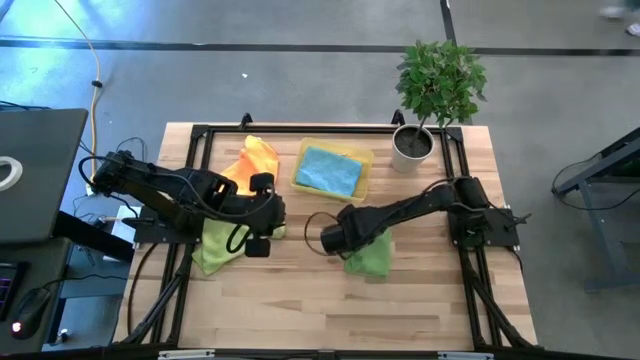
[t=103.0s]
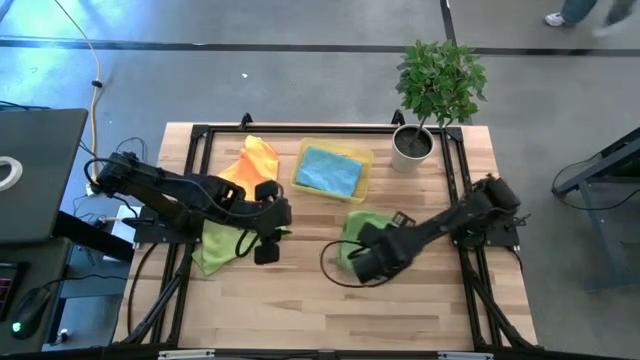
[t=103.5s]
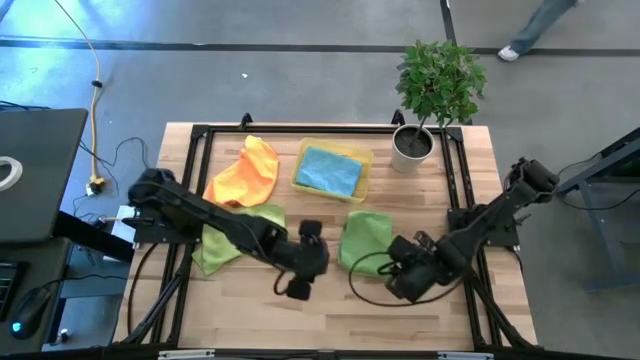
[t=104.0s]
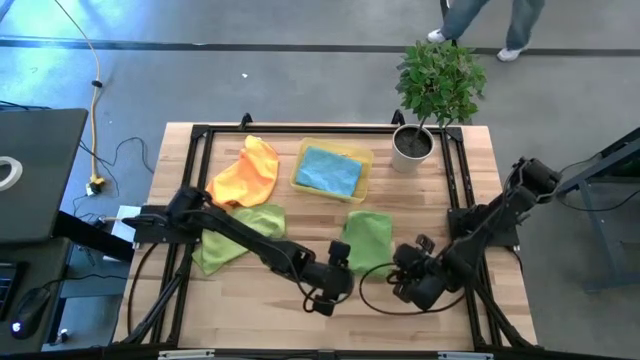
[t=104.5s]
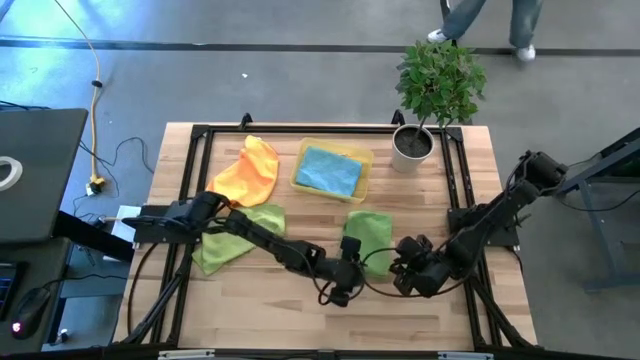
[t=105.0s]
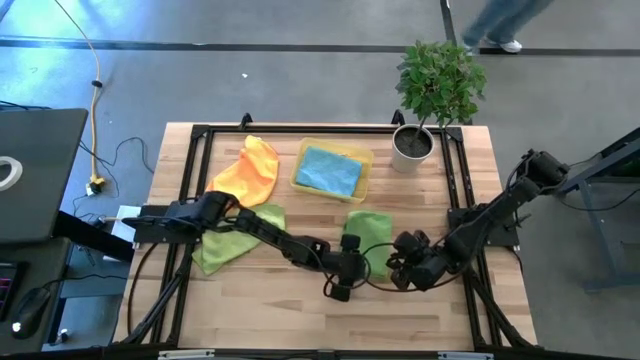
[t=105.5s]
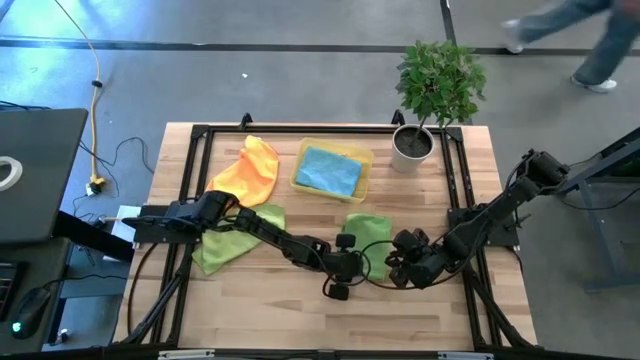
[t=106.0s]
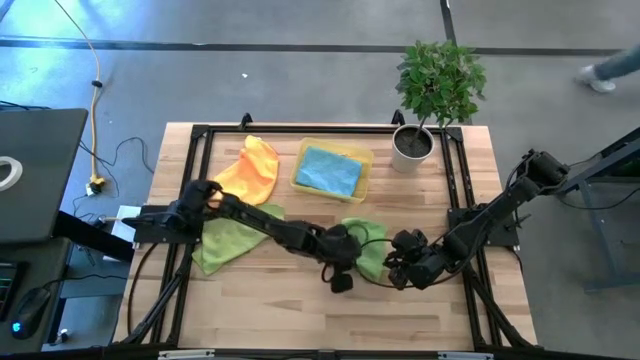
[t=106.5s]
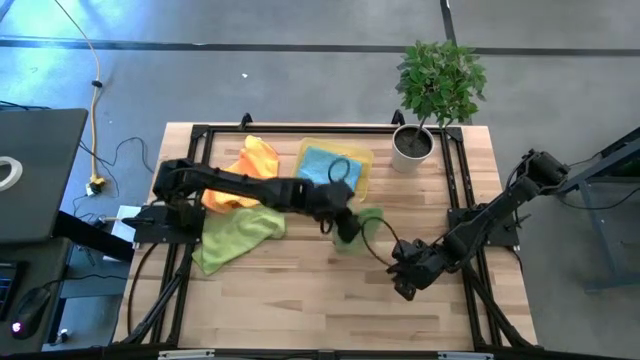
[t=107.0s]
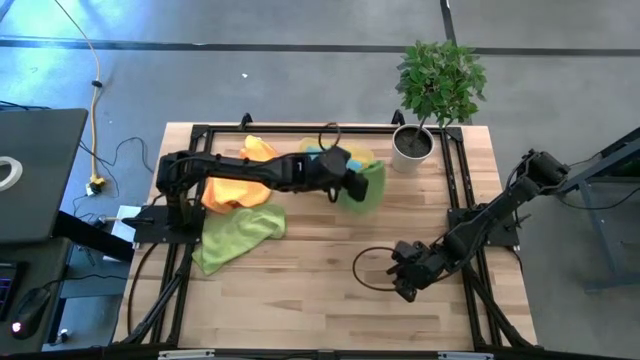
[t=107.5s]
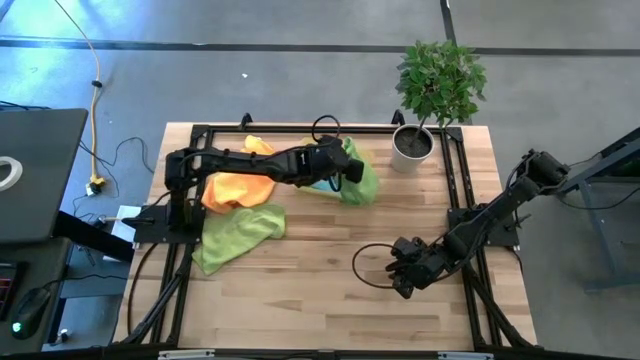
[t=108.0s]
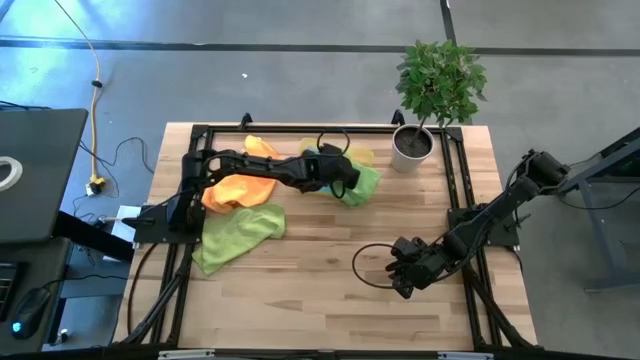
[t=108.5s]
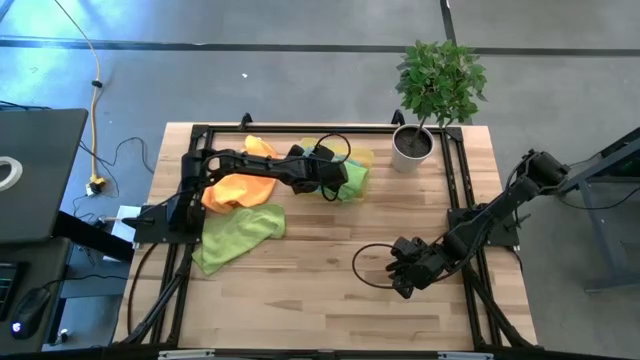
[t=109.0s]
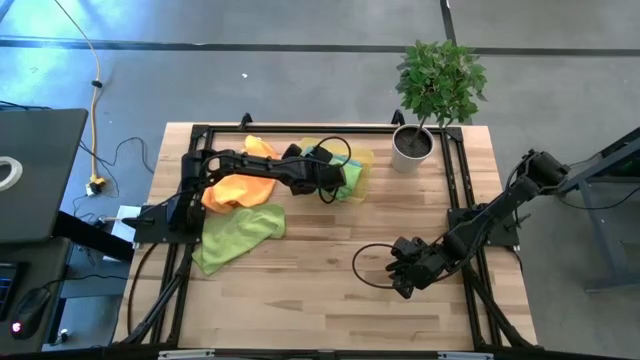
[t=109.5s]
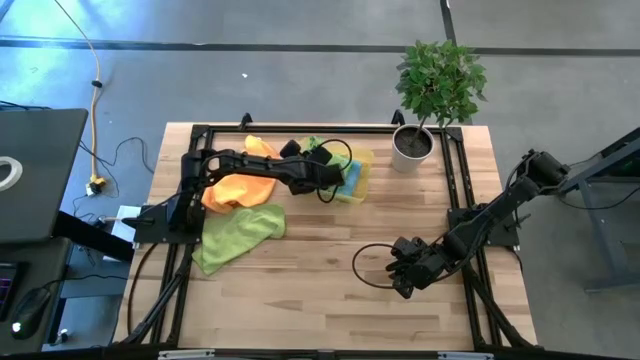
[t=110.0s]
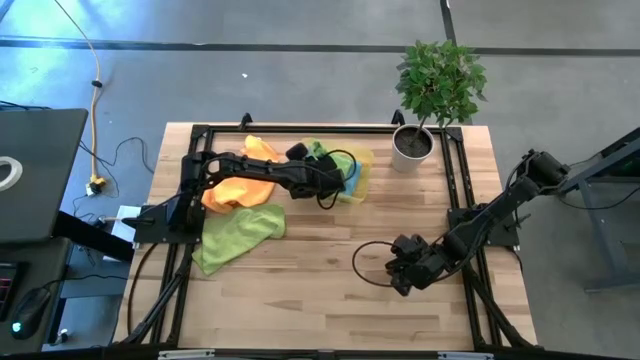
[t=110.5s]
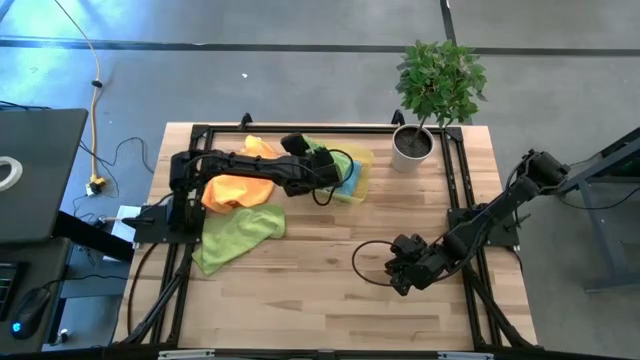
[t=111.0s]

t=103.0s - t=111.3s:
Task: Fold microfiber towels
Put the folded green microfiber towel into the yellow bin

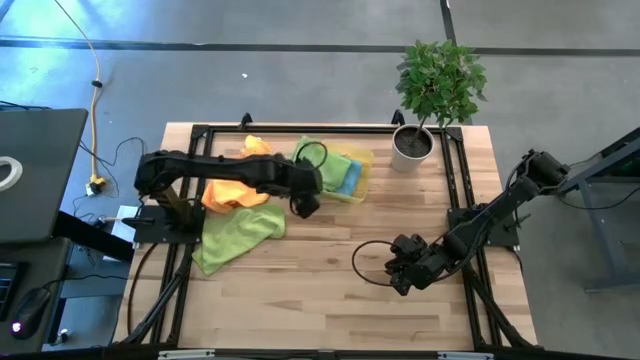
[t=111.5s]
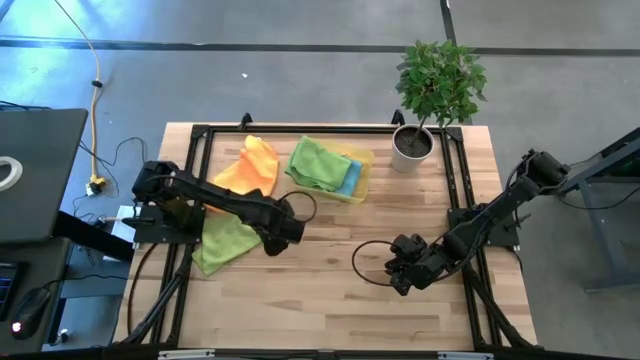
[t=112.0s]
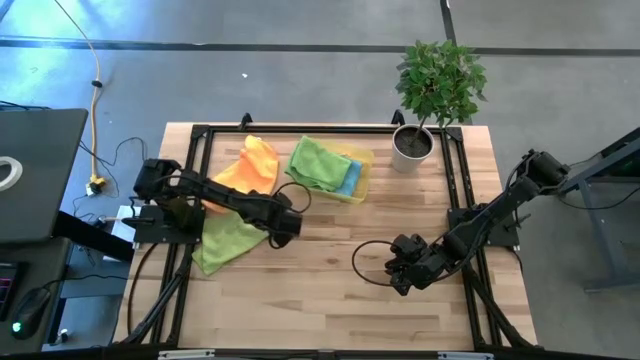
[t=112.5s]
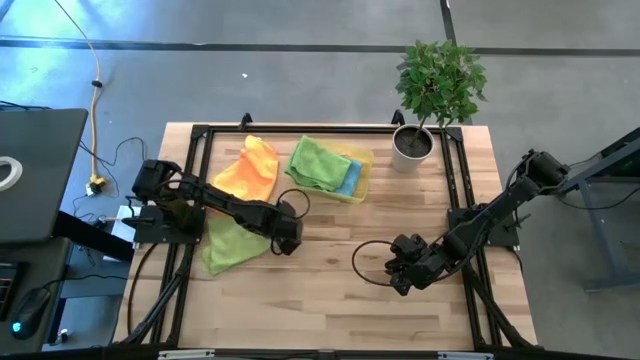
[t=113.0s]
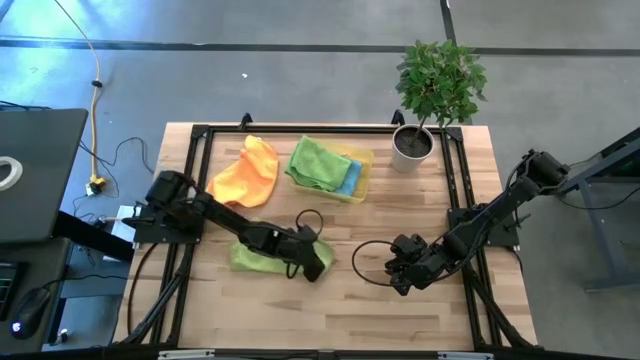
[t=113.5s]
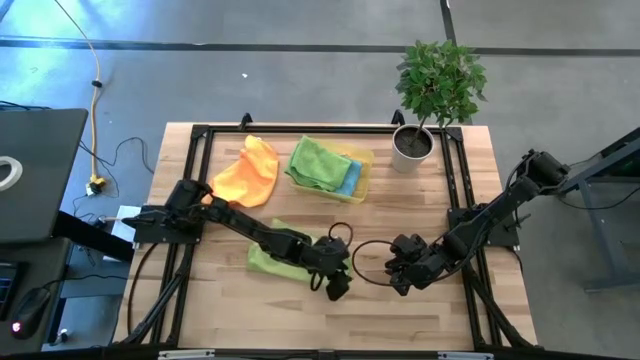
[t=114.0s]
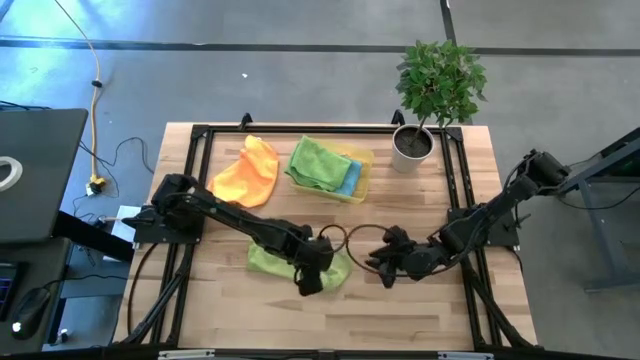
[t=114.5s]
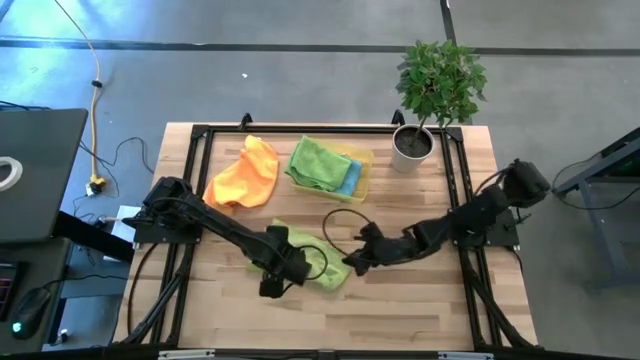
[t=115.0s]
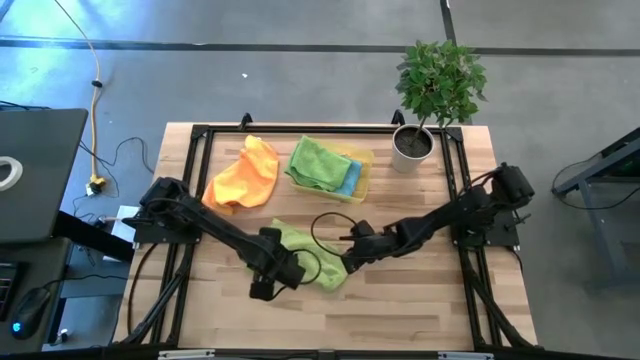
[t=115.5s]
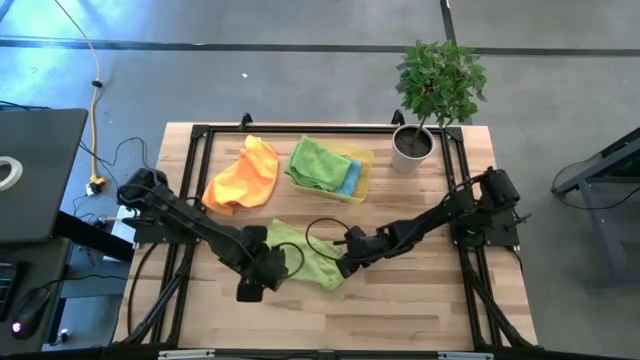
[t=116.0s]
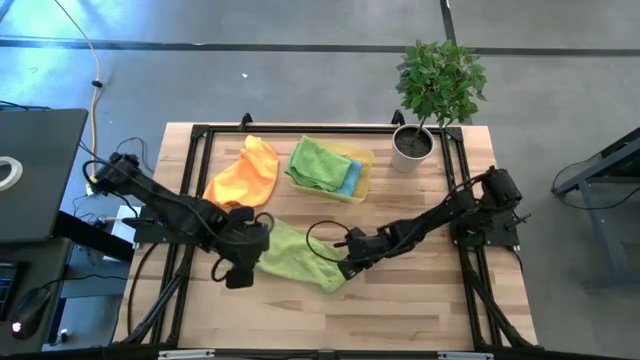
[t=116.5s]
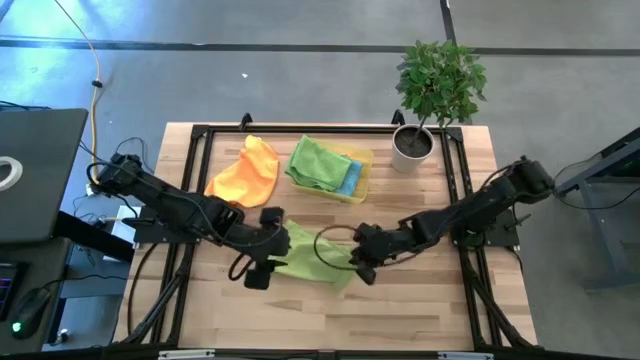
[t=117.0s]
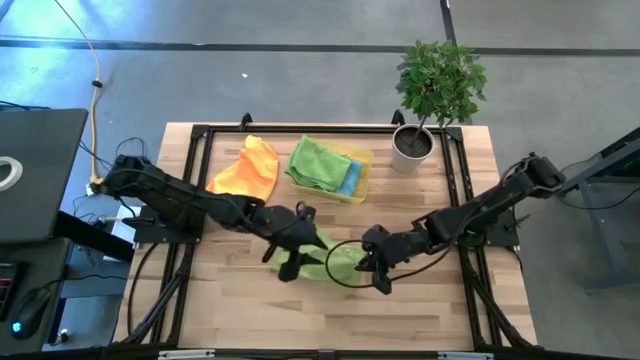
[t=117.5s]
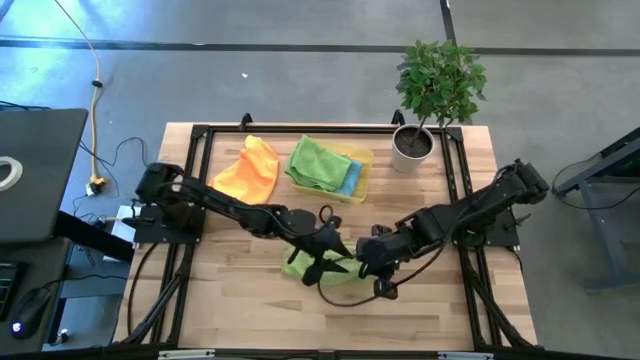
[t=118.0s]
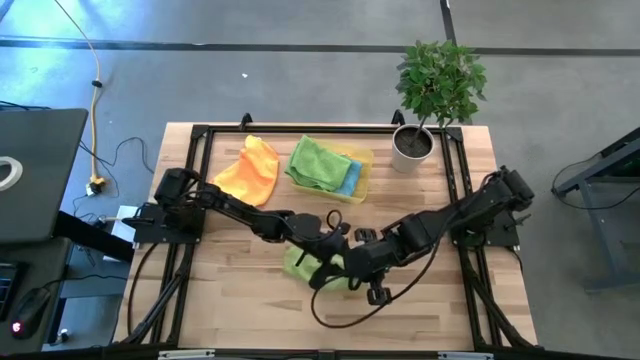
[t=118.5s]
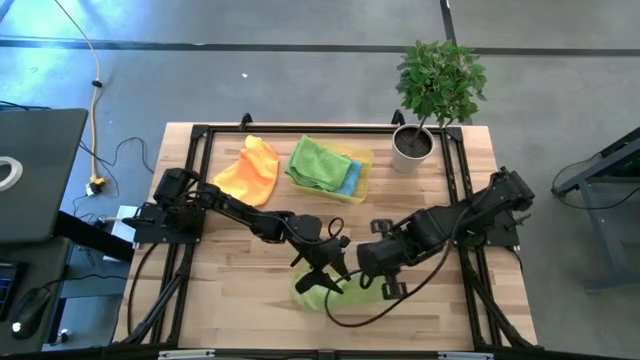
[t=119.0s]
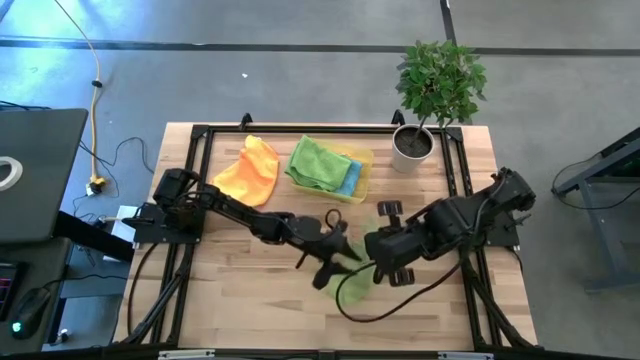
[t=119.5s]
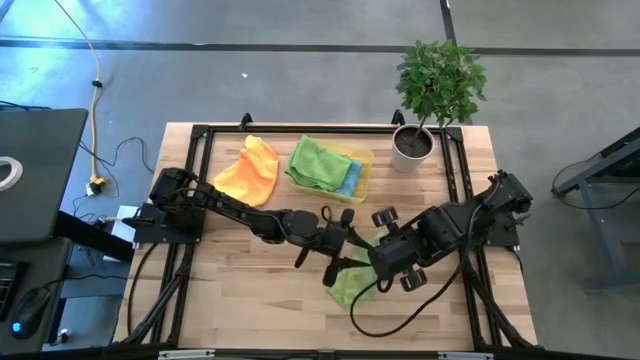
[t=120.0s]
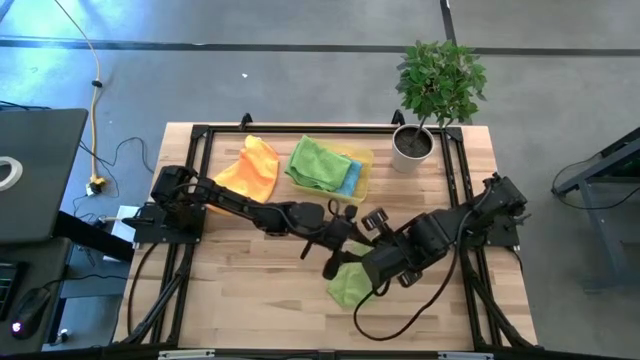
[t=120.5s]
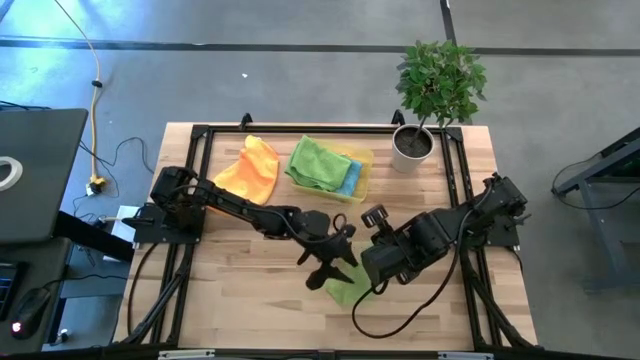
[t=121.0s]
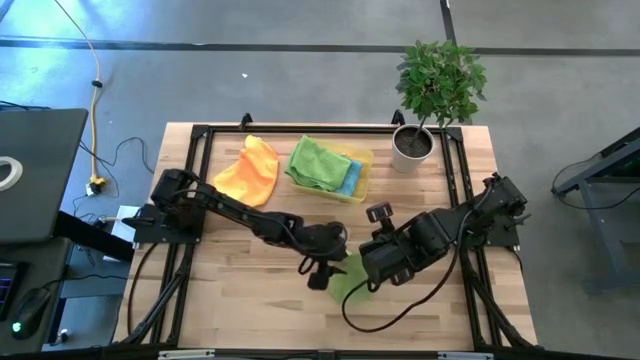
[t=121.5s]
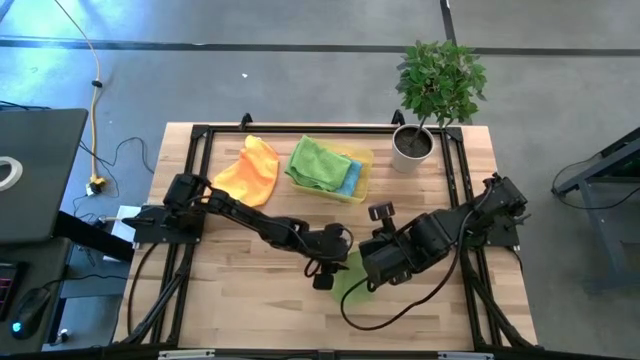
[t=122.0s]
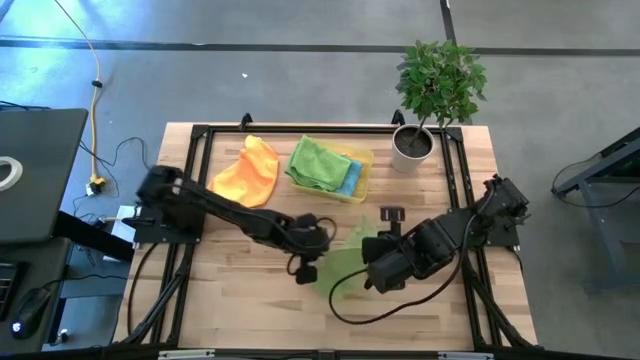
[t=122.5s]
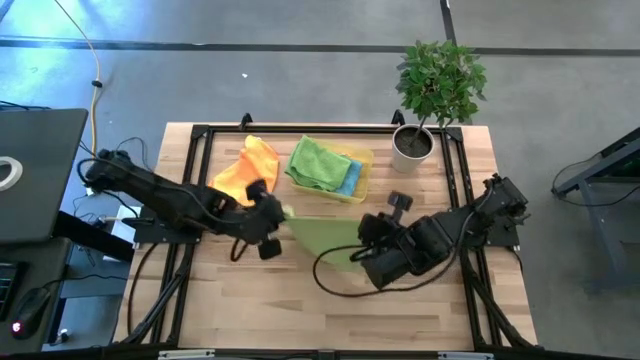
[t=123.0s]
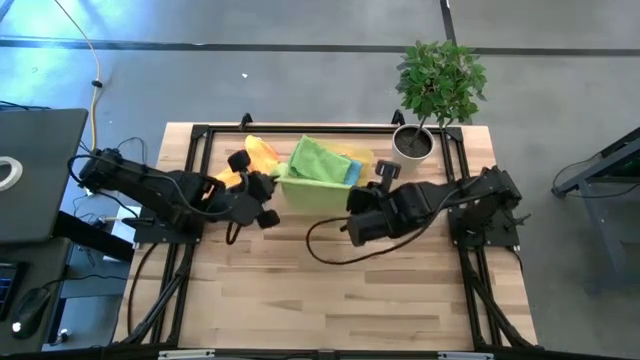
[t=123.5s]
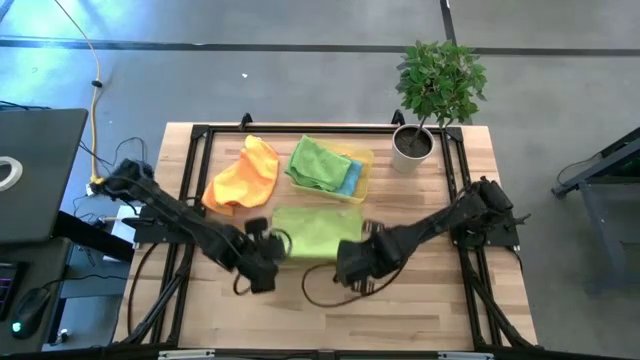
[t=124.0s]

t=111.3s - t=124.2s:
Fold the light green microfiber towel
